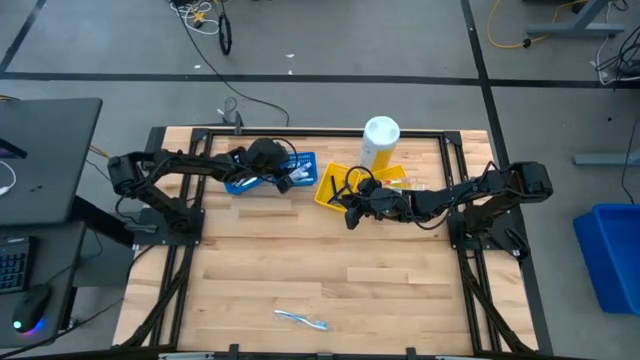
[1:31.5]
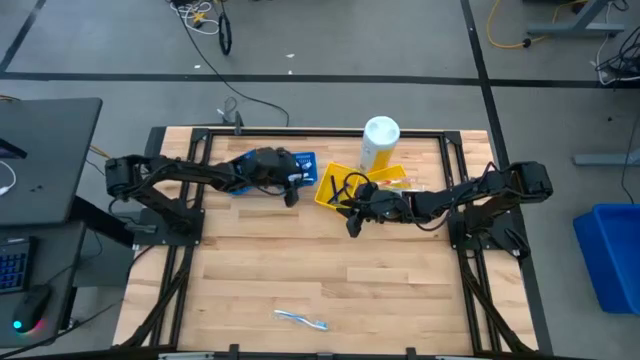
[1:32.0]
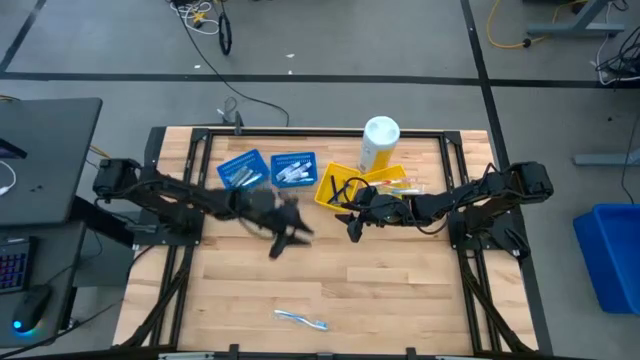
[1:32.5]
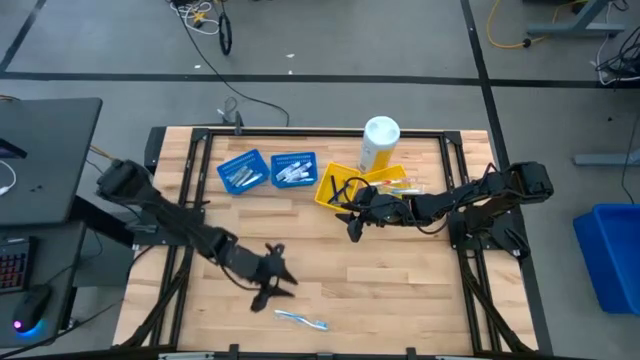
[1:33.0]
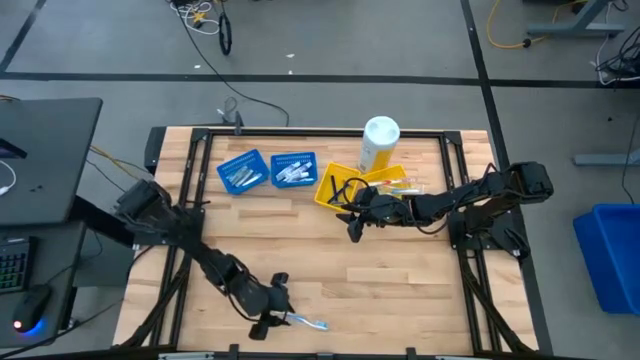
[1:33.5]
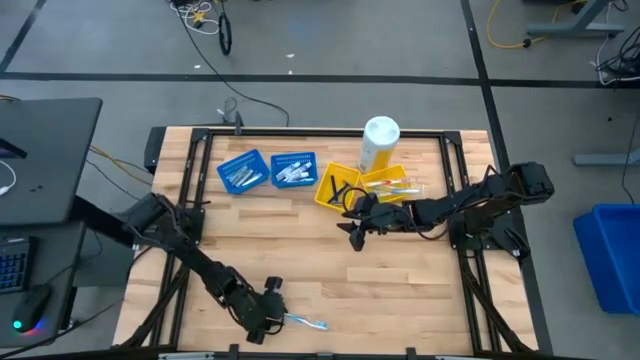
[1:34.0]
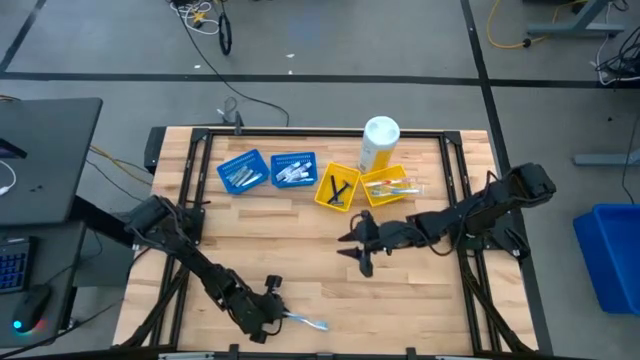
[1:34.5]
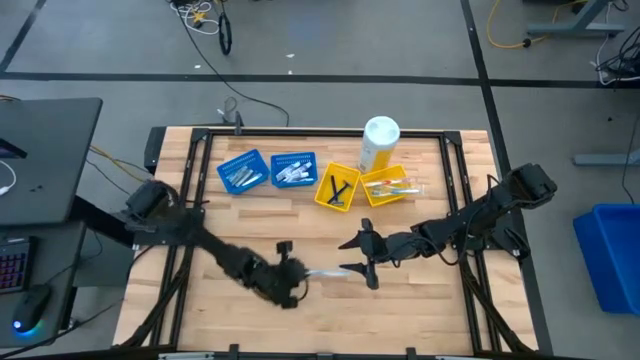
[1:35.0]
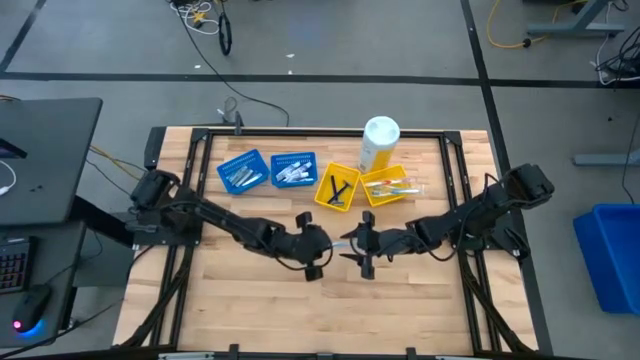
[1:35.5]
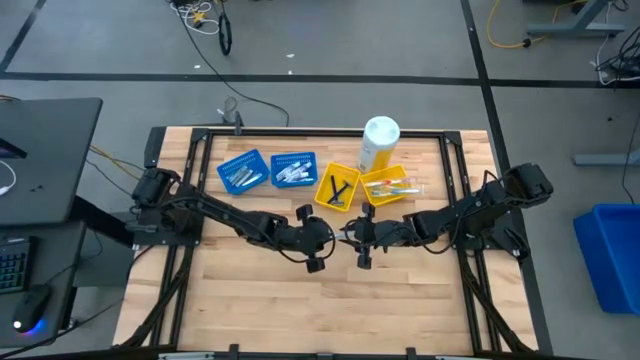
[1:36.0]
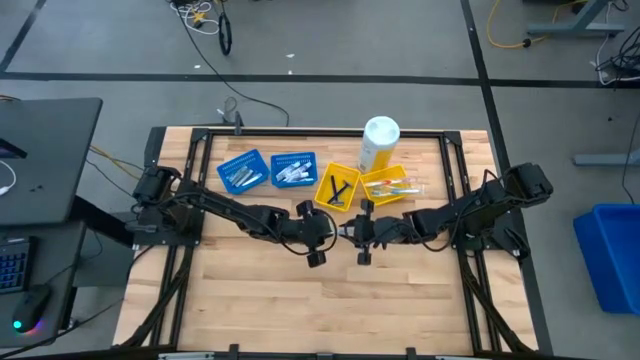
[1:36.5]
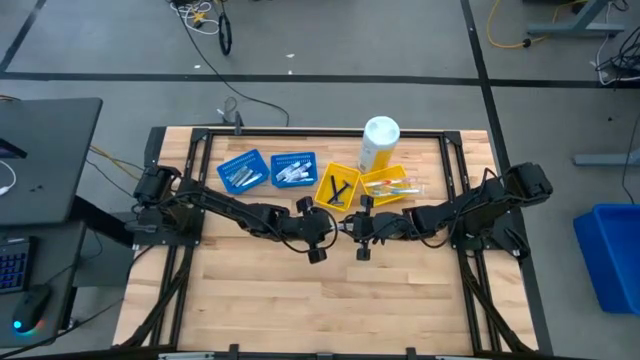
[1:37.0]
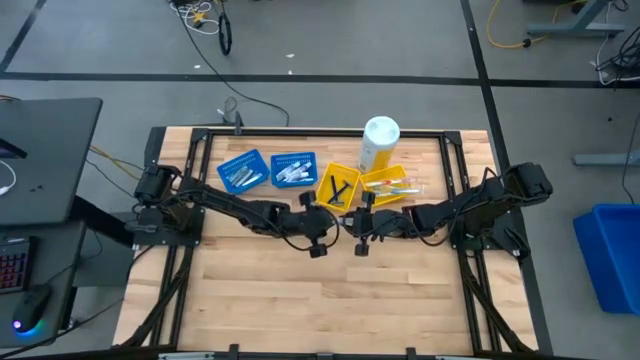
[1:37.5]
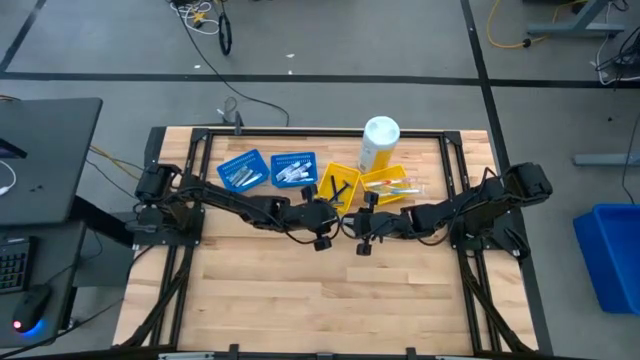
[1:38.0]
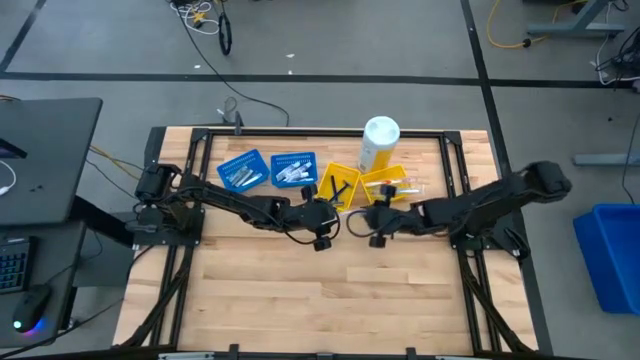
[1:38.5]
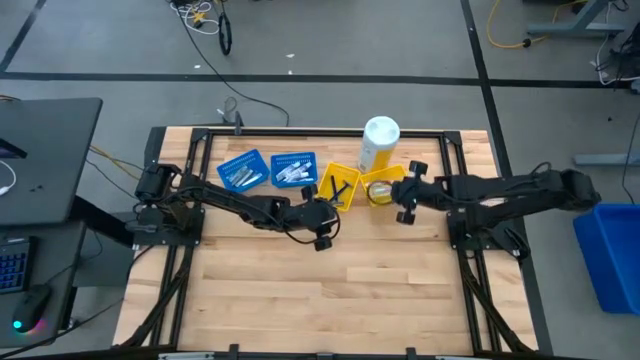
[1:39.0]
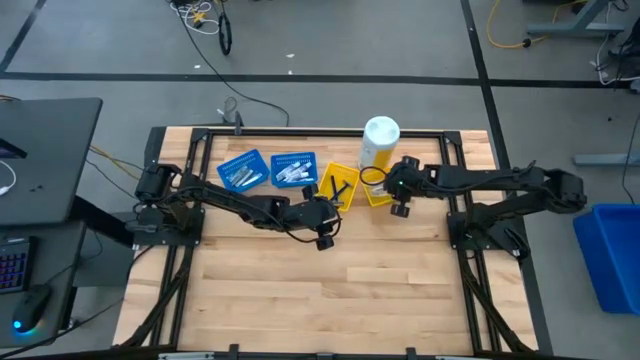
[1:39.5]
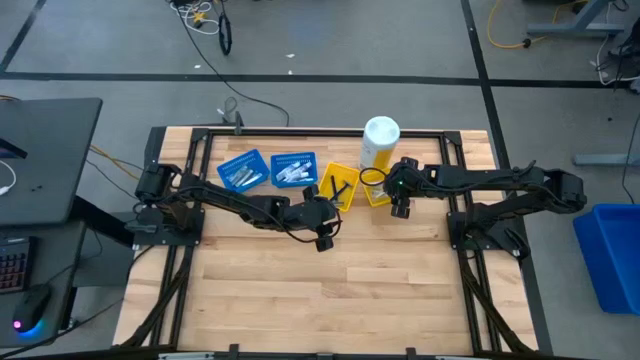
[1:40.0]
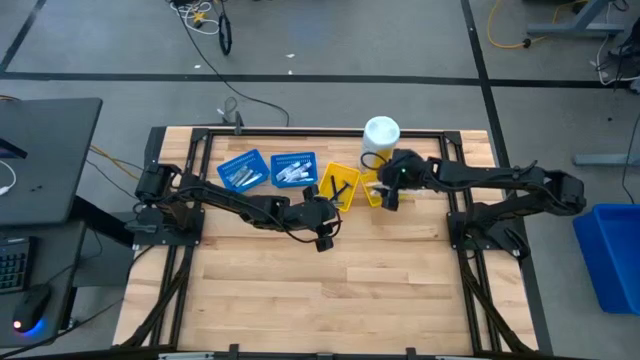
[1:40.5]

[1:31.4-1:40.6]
Task: Pick & Place Travel size toiletries
Put the blue toothbrush into the right yellow bin

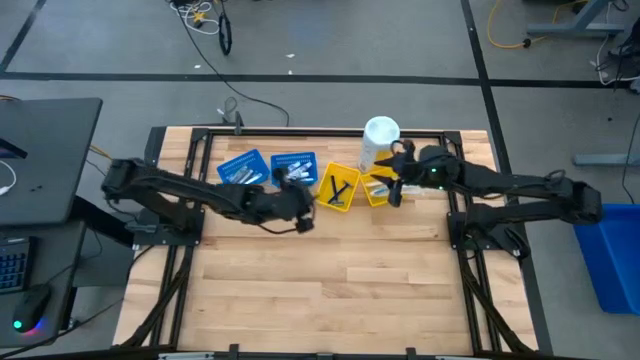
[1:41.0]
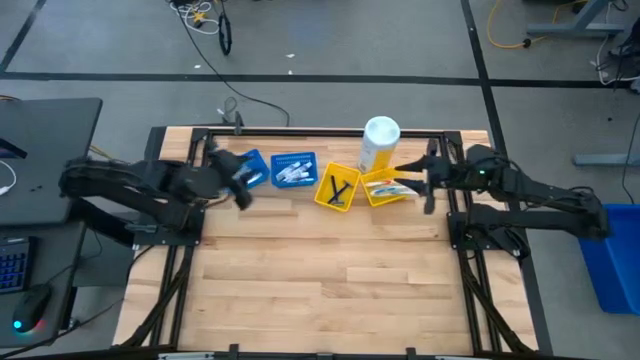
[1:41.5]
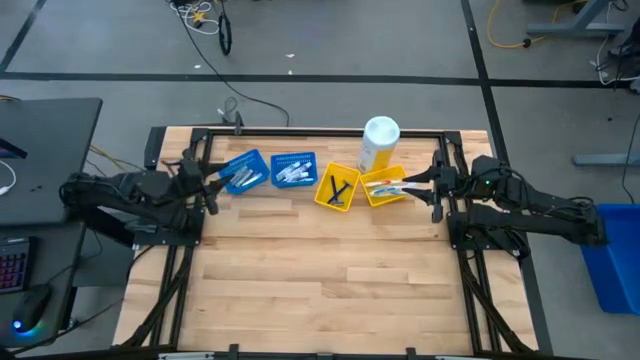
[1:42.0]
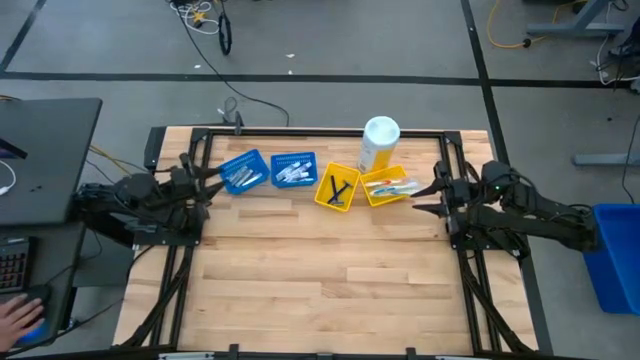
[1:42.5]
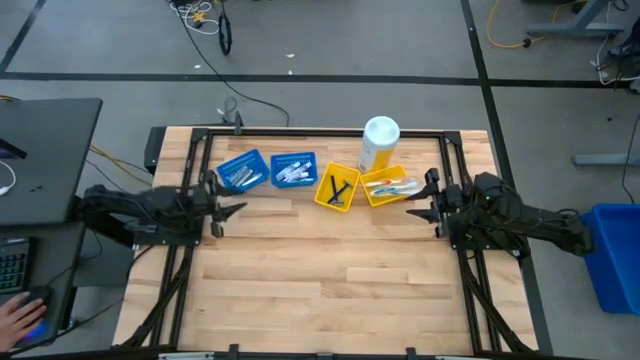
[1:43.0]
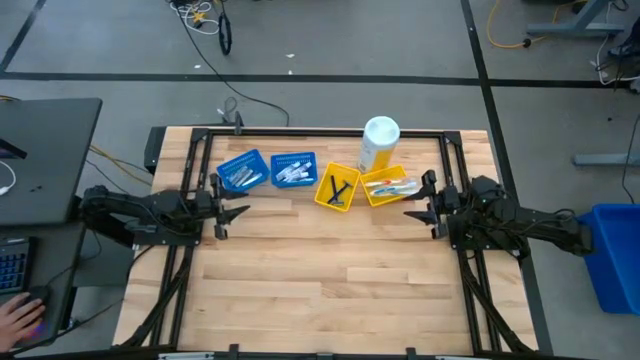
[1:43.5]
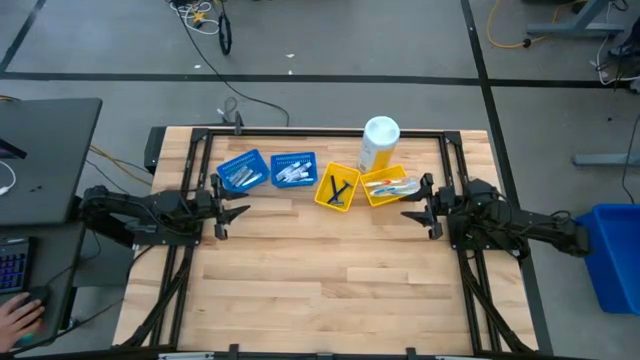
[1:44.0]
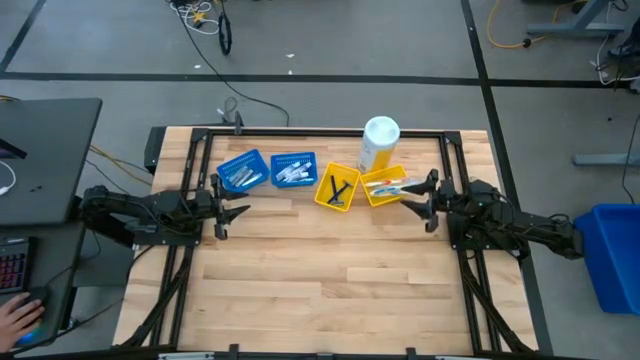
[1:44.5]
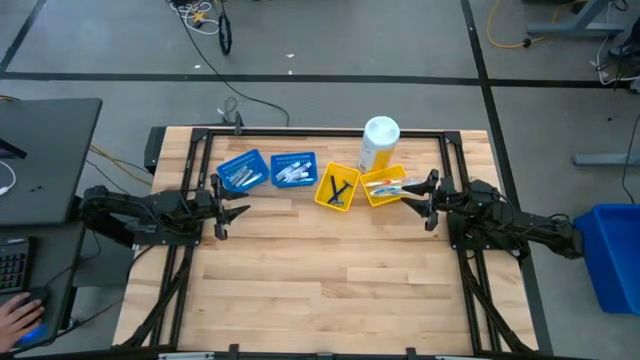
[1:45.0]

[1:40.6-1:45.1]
Return to Home Position

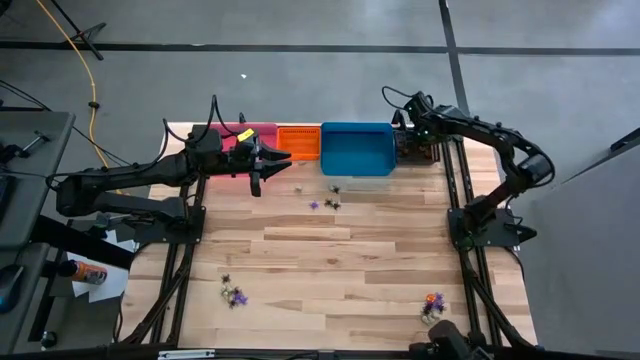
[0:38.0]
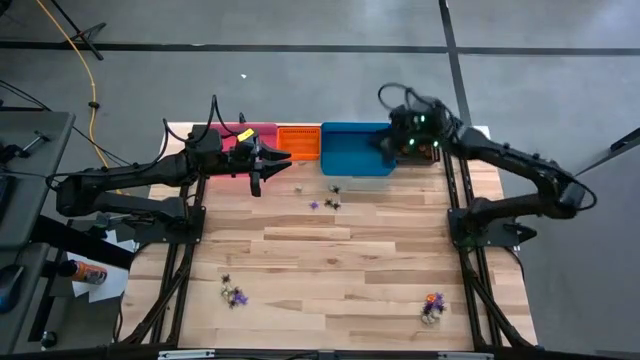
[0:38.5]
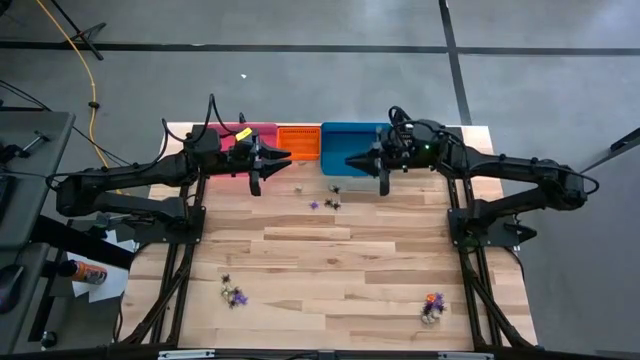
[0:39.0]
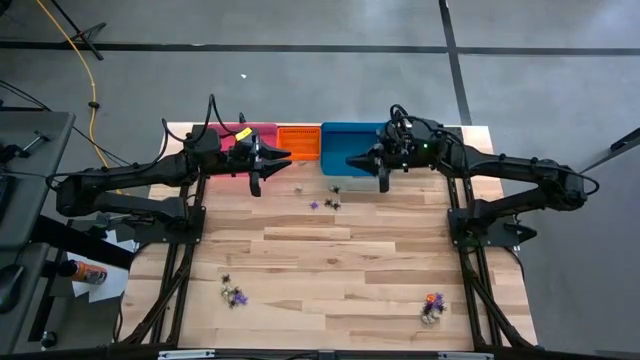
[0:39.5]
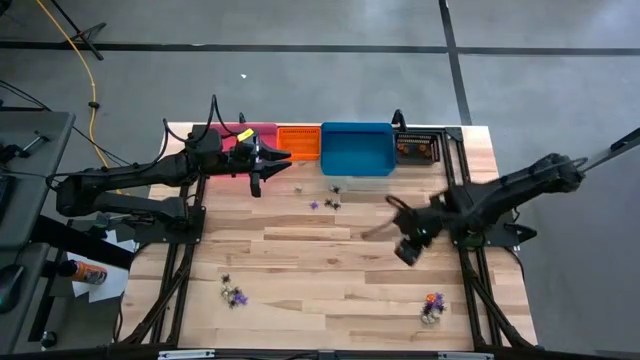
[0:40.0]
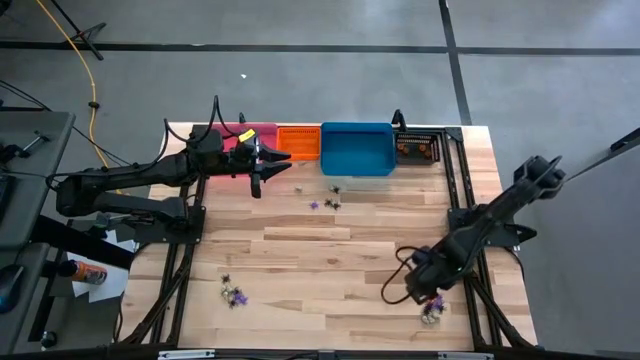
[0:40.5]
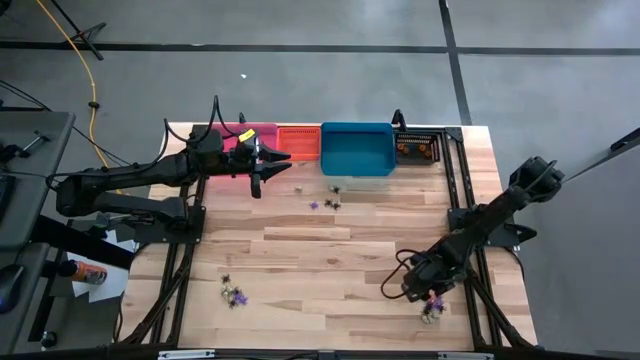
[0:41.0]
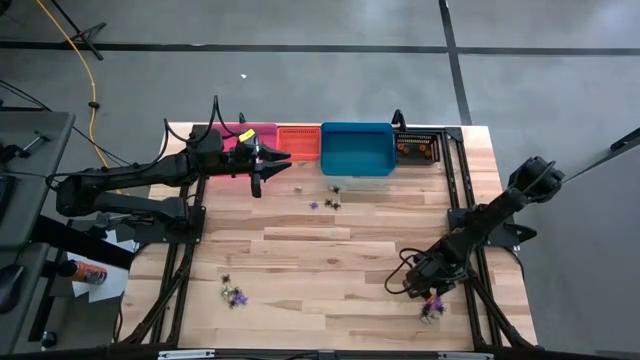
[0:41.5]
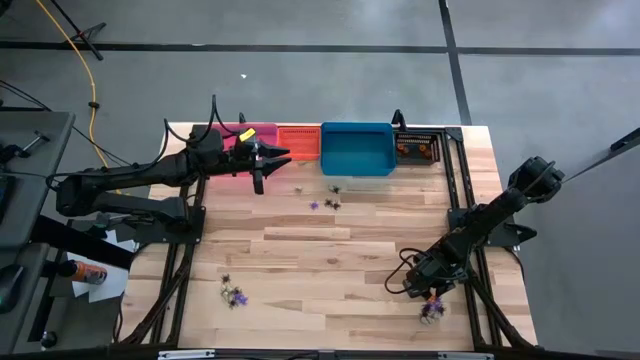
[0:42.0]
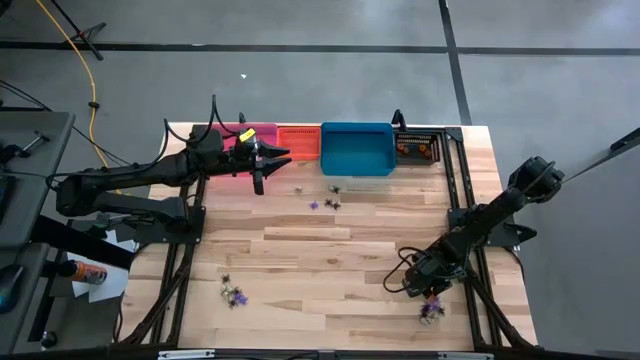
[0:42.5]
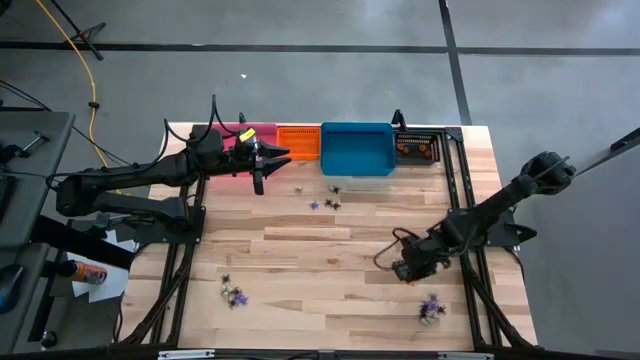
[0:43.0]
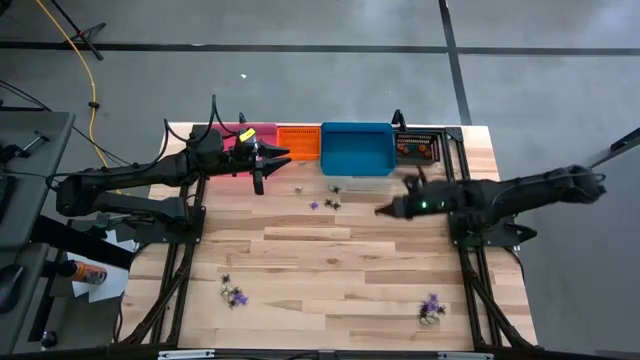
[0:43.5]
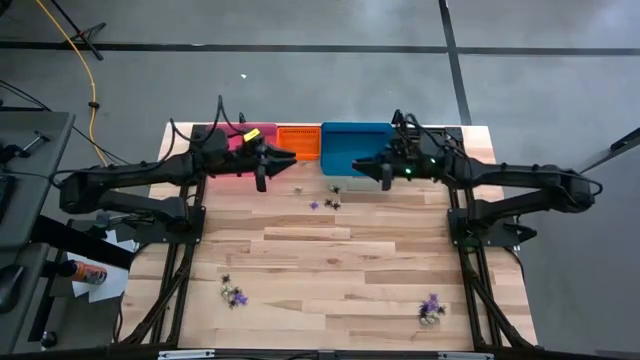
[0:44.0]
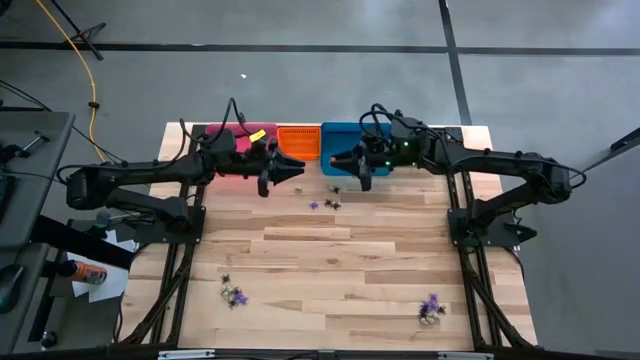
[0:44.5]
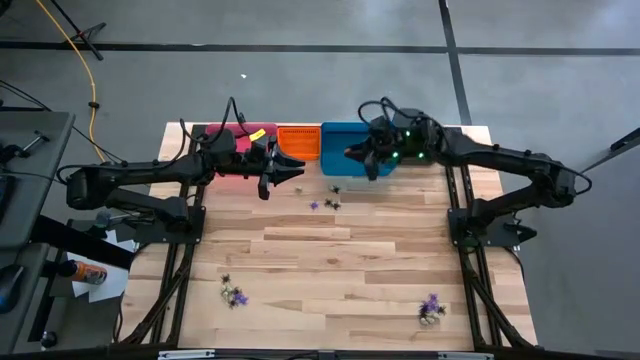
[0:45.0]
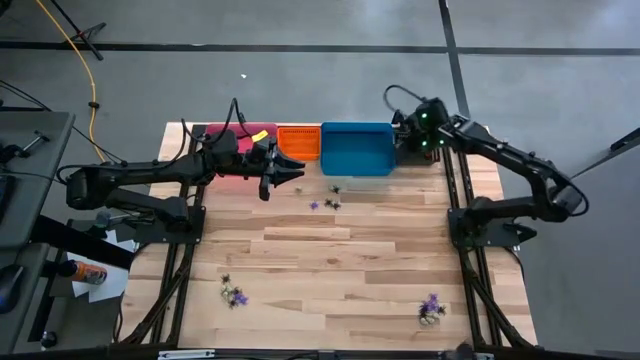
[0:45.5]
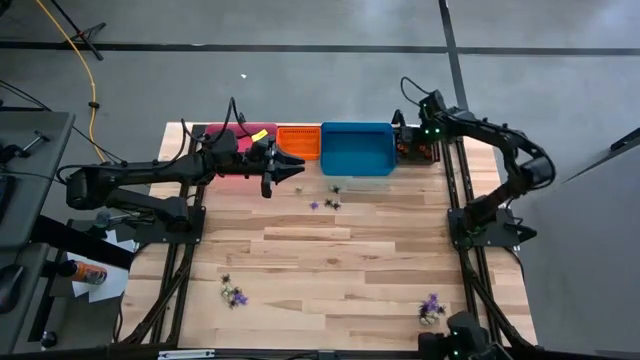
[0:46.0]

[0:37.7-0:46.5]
Task: Sort Halloween decoration
Put the orange pumpkin toy into the black bin
